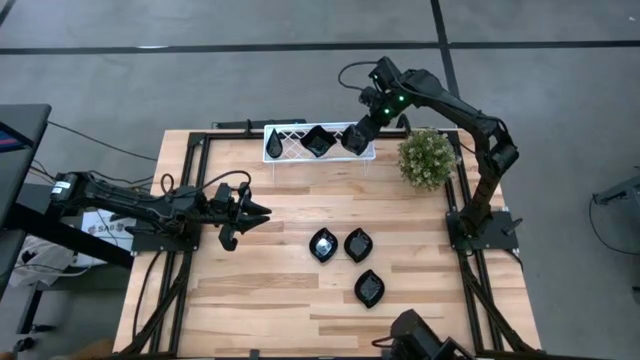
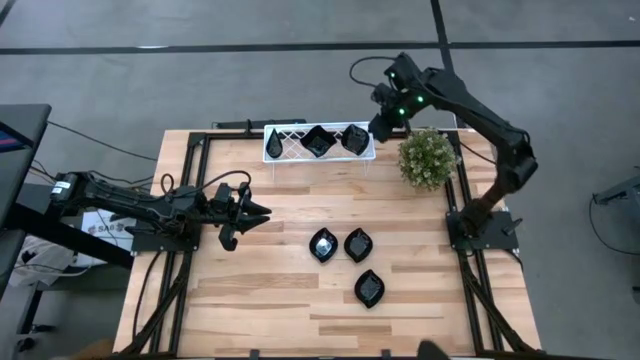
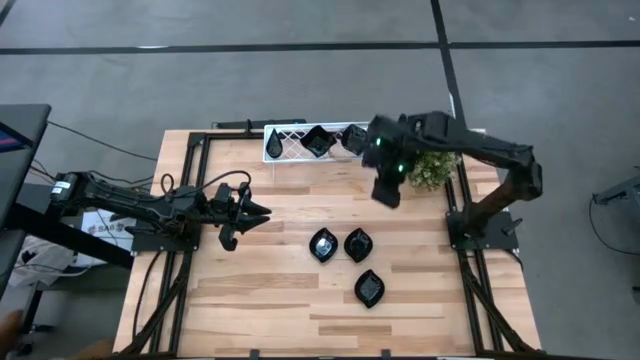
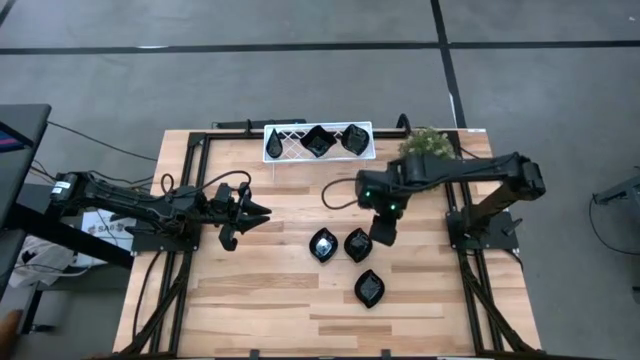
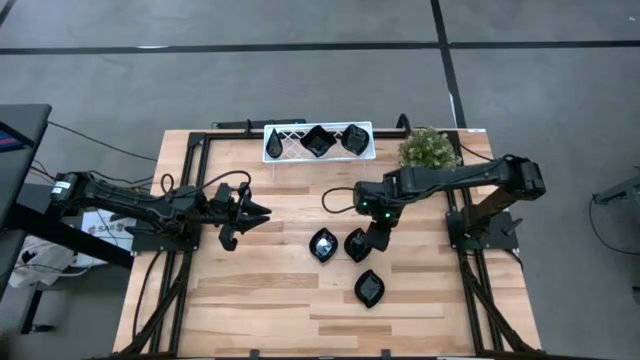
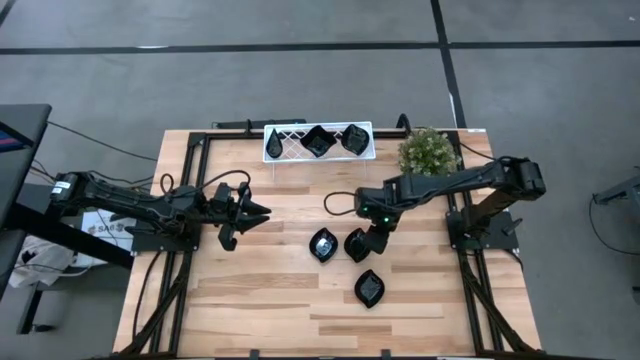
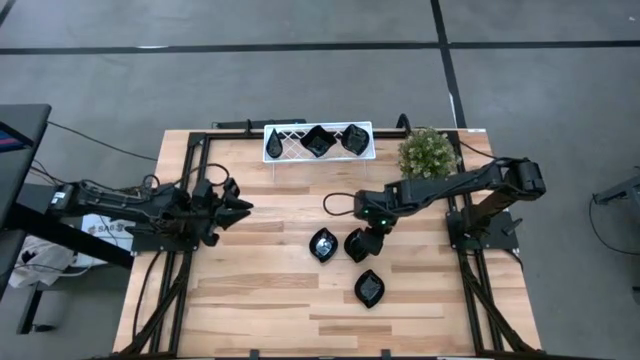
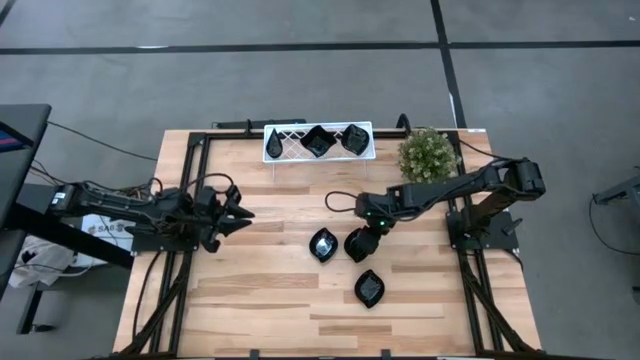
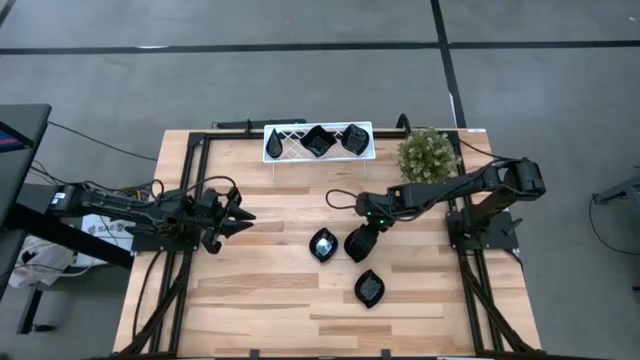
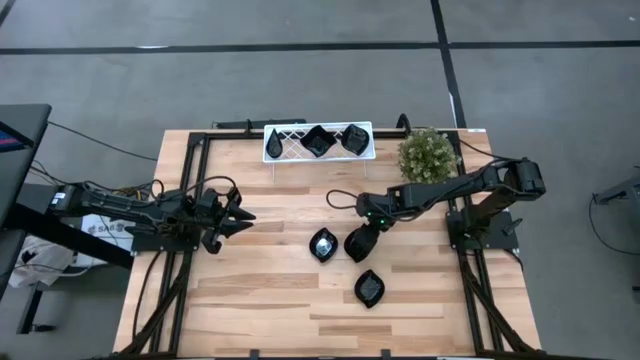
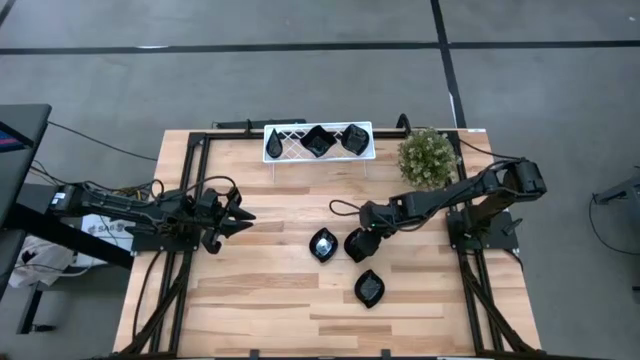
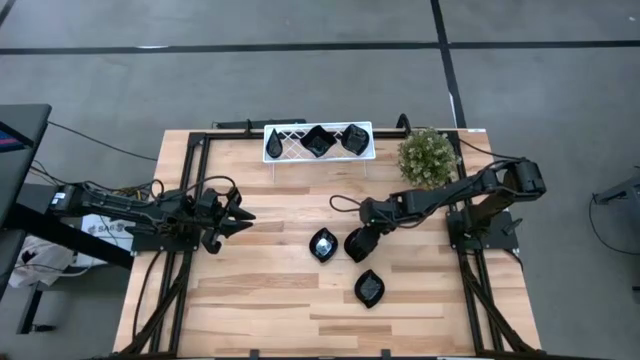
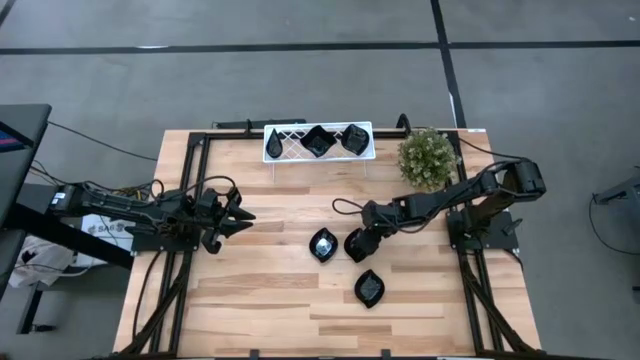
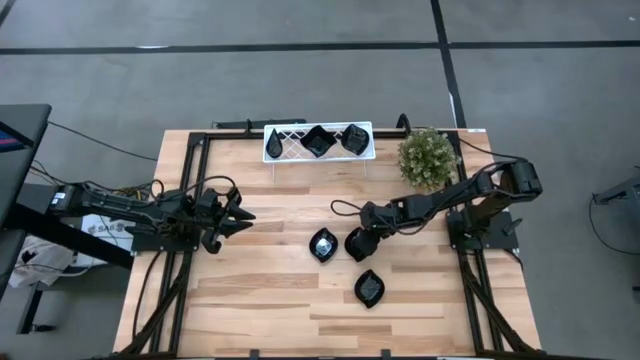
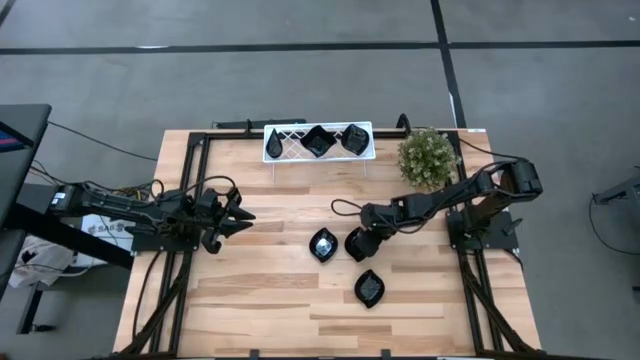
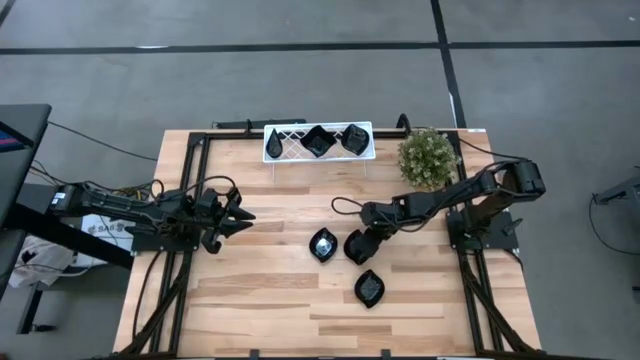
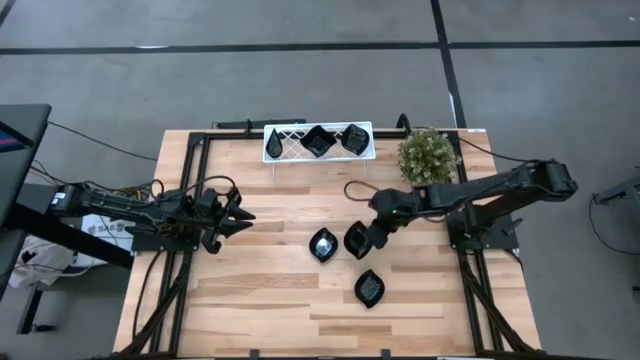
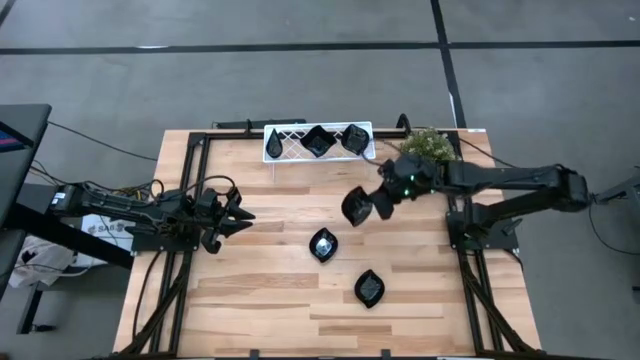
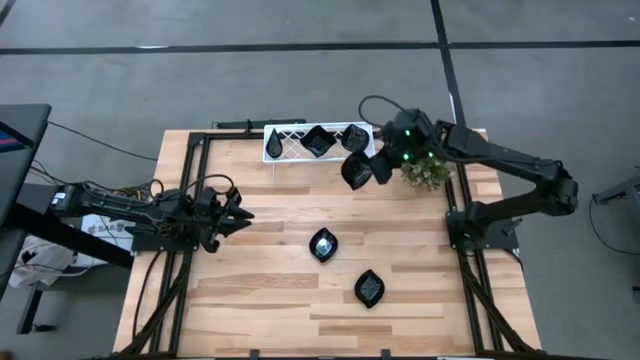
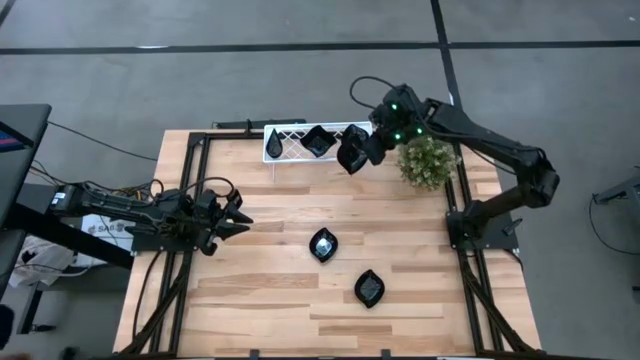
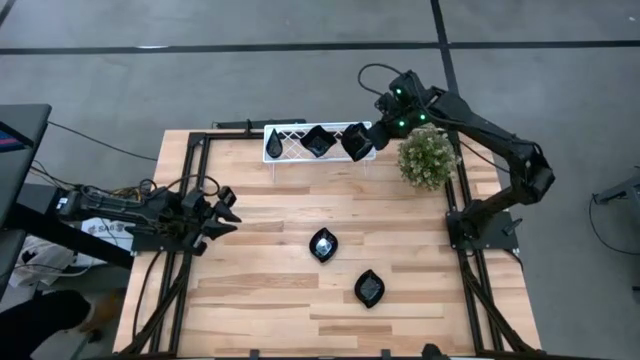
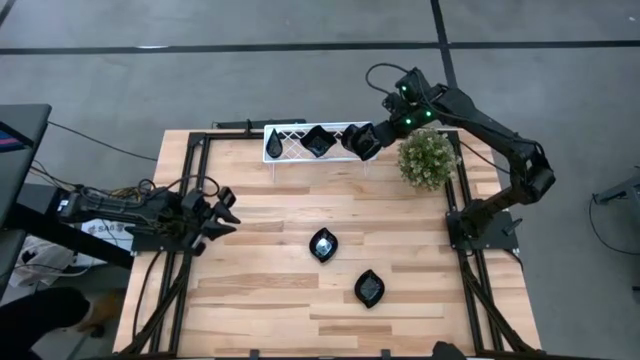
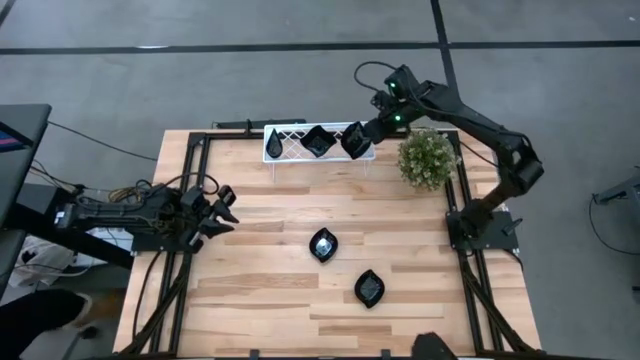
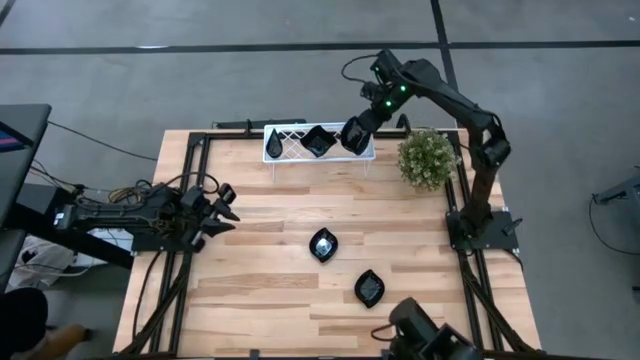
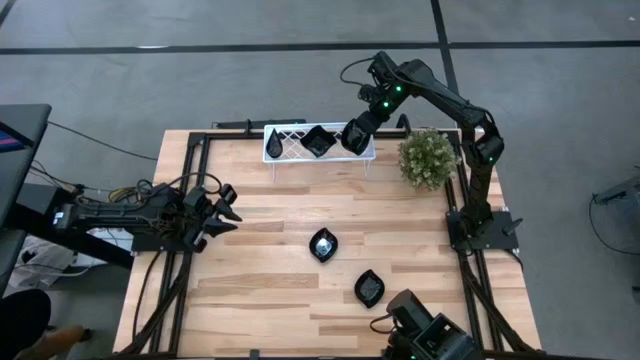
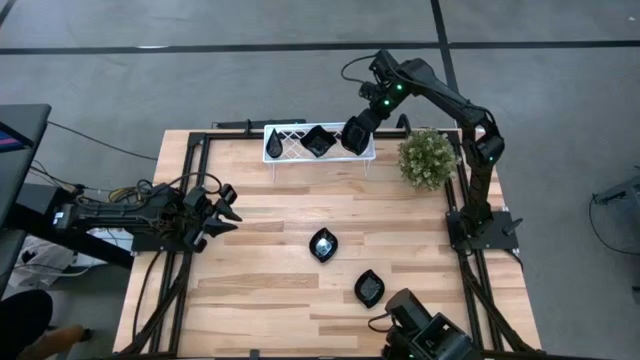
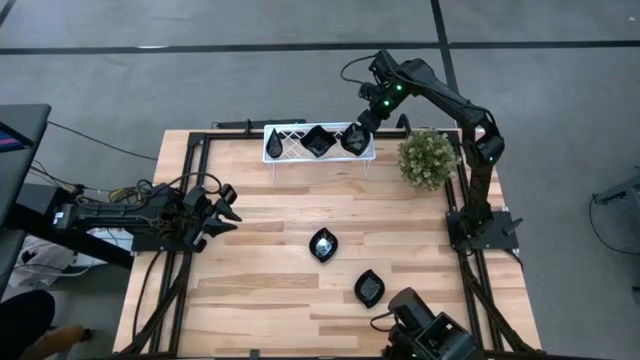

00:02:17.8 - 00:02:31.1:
Task: Pick & Place Mini shaped plates
Stack the black leaf-shaped plate on top of the black leaf-shaped plates on the shelf

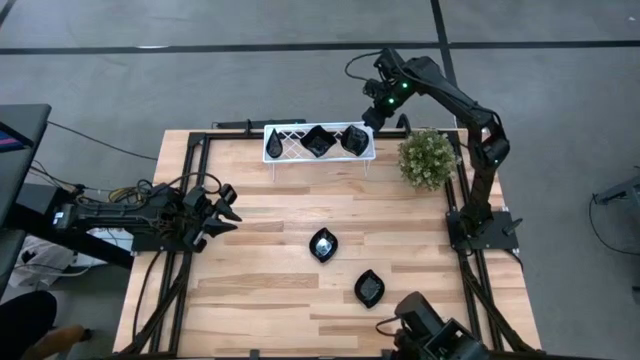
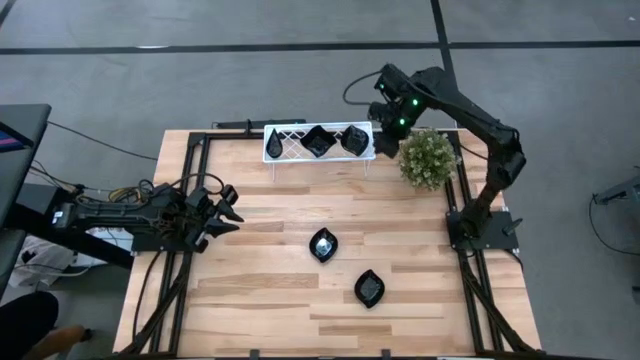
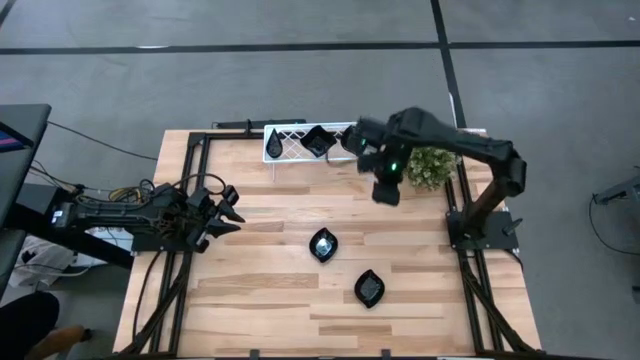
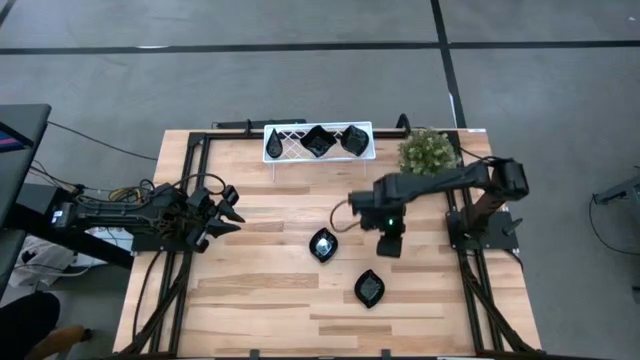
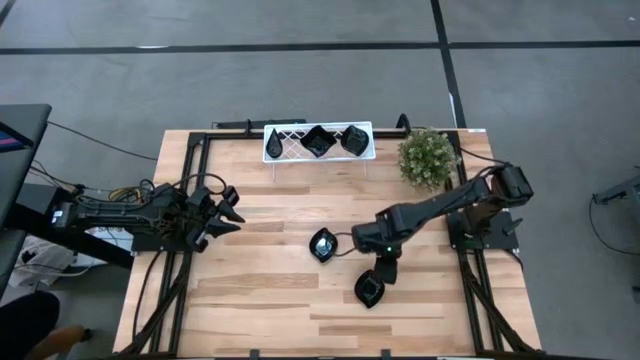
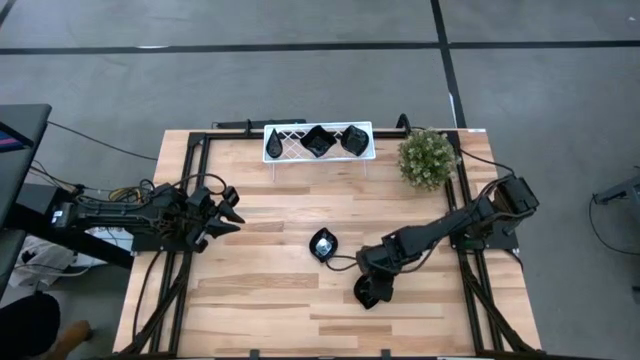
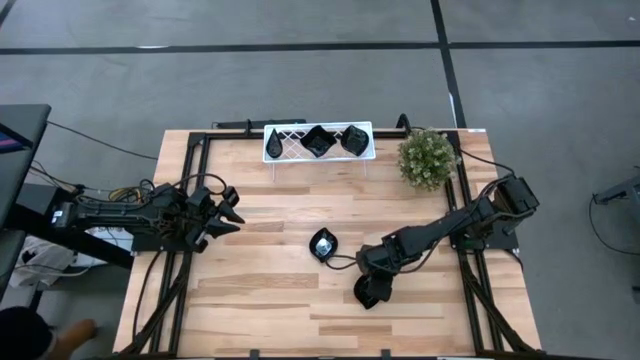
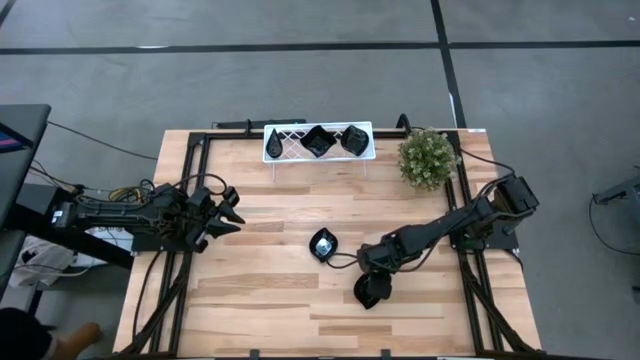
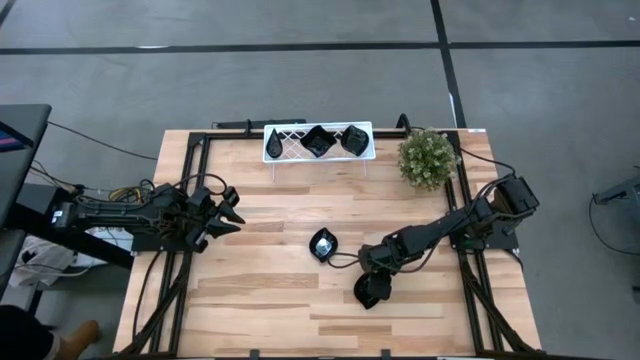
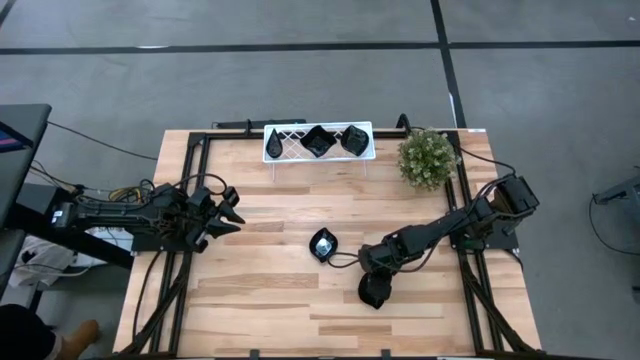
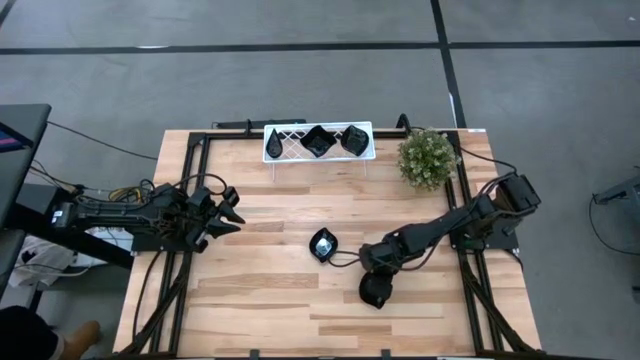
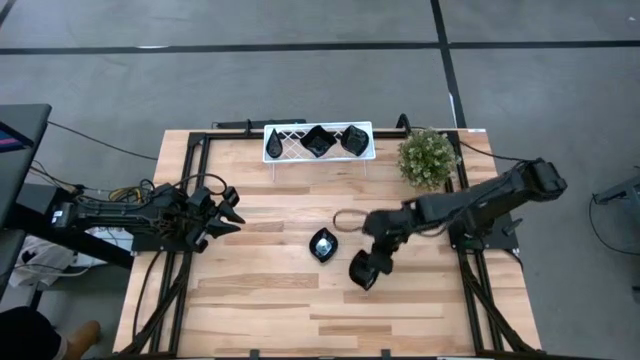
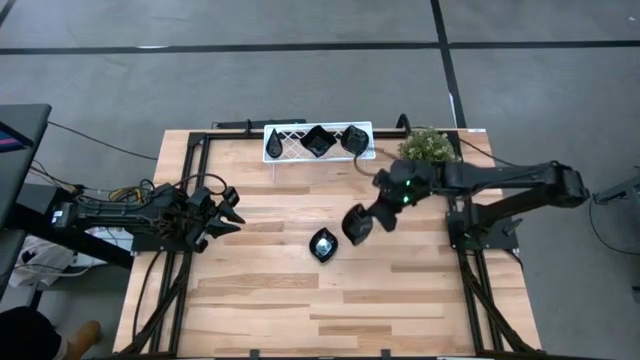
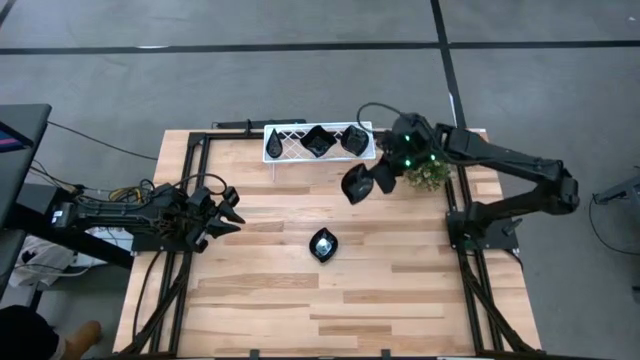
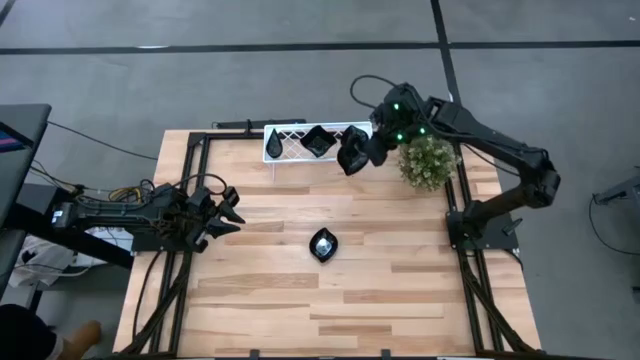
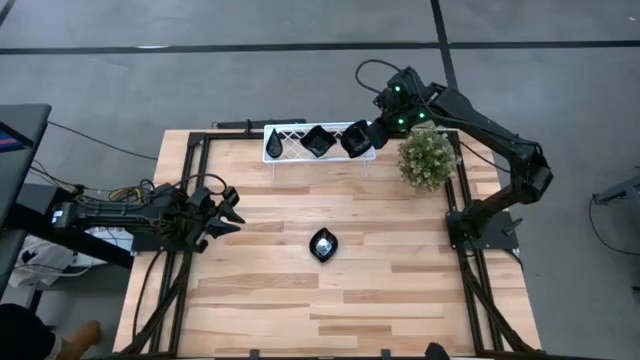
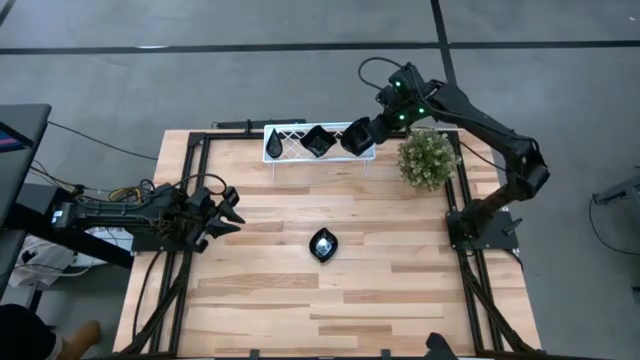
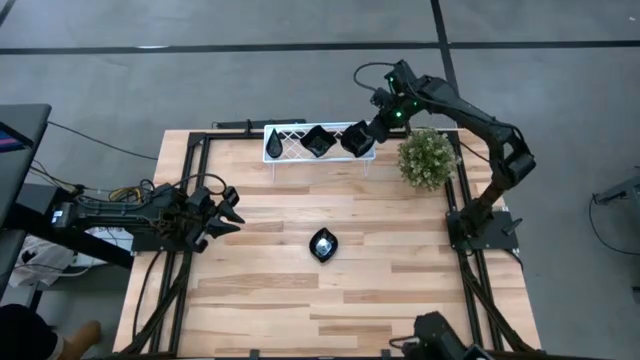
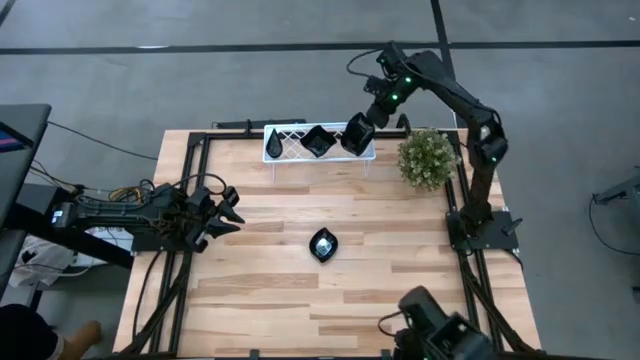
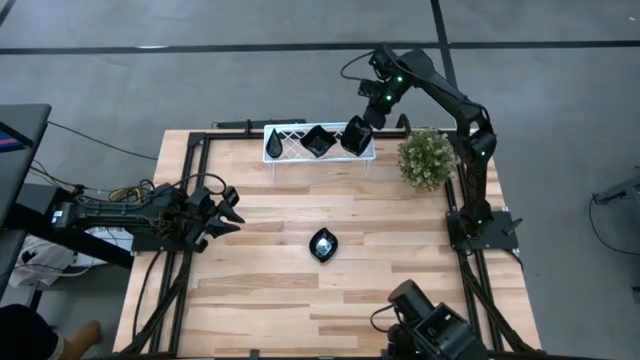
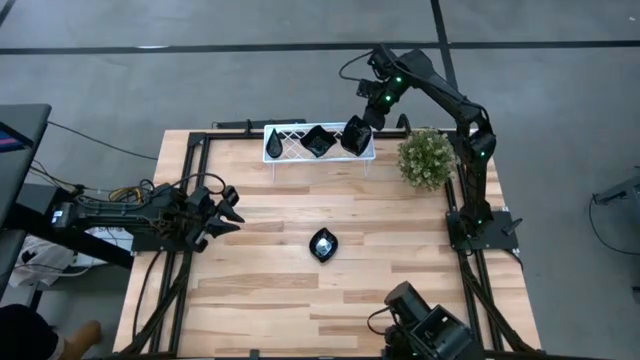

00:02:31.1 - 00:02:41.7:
Stack the black leaf-shaped plate on top of the black leaf-shaped plates on the shelf
